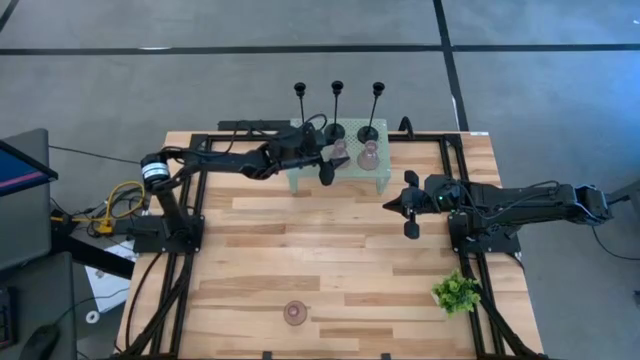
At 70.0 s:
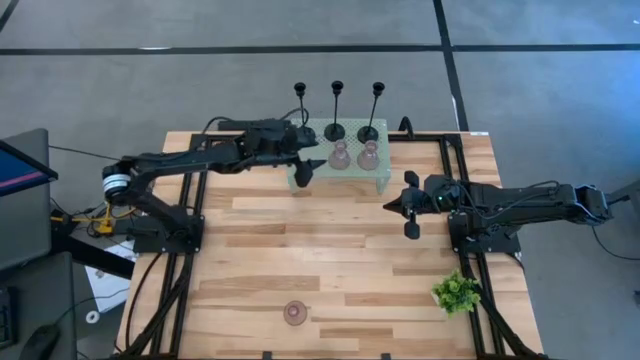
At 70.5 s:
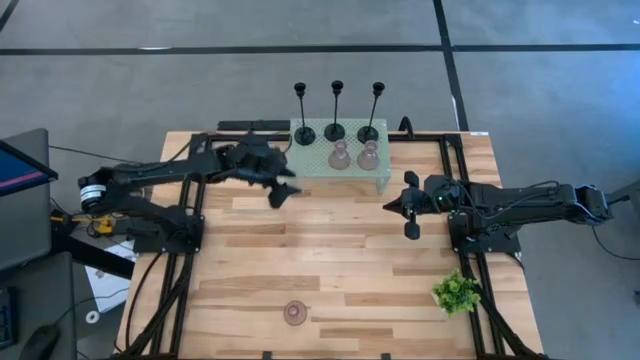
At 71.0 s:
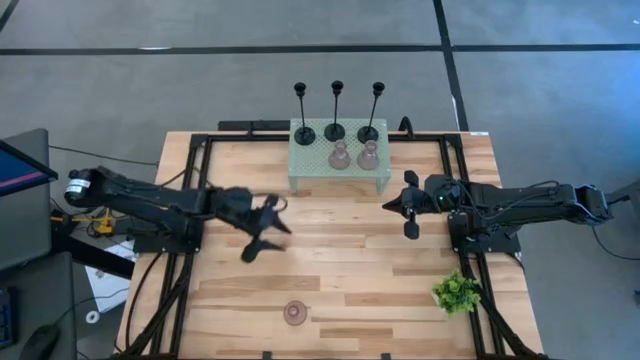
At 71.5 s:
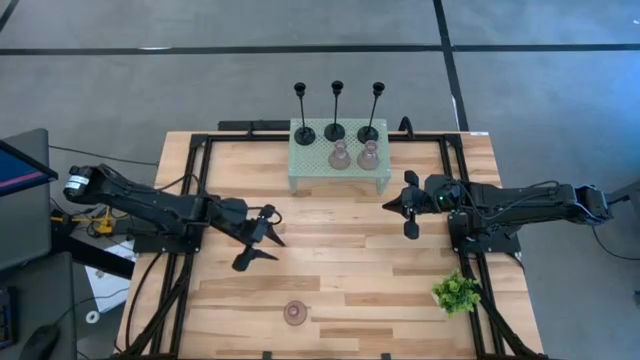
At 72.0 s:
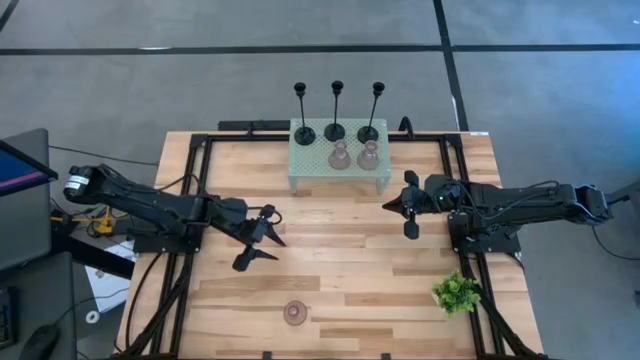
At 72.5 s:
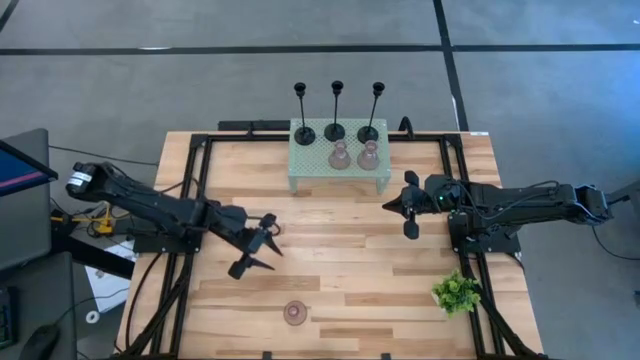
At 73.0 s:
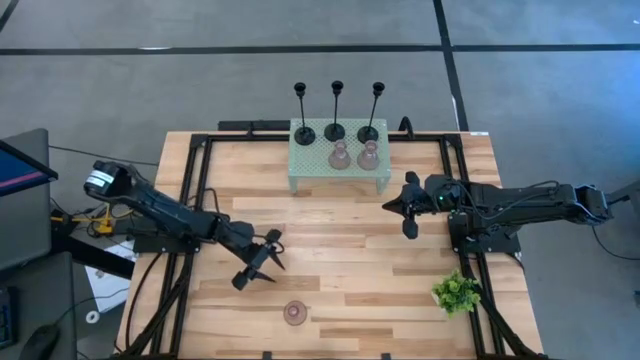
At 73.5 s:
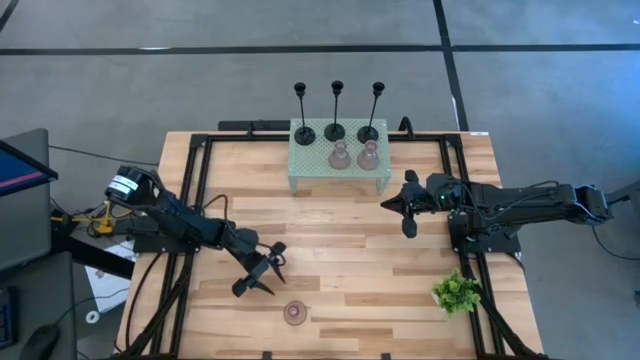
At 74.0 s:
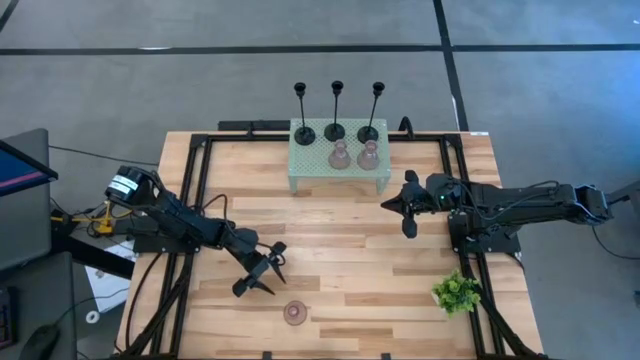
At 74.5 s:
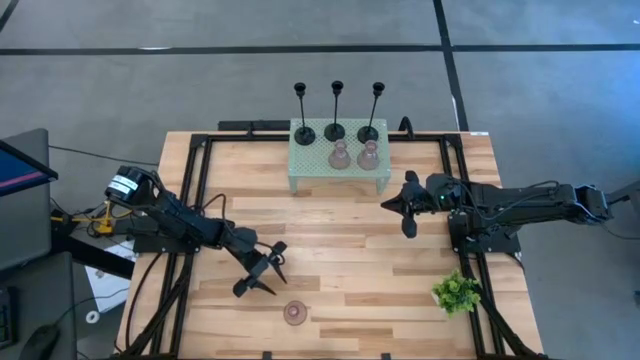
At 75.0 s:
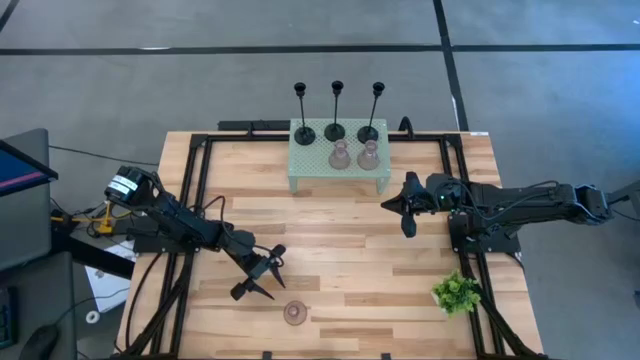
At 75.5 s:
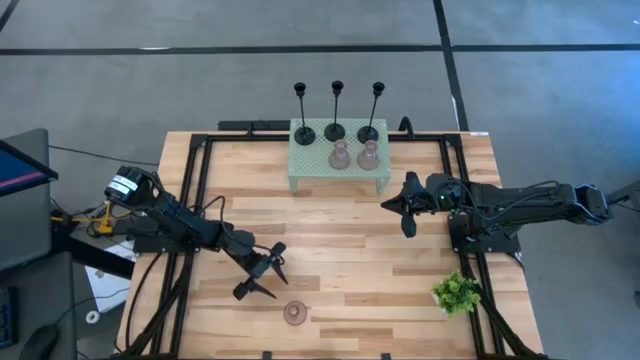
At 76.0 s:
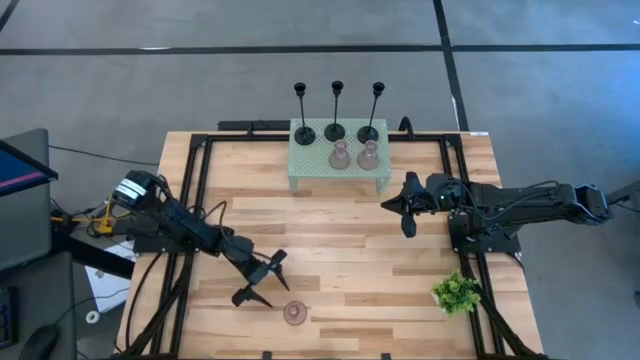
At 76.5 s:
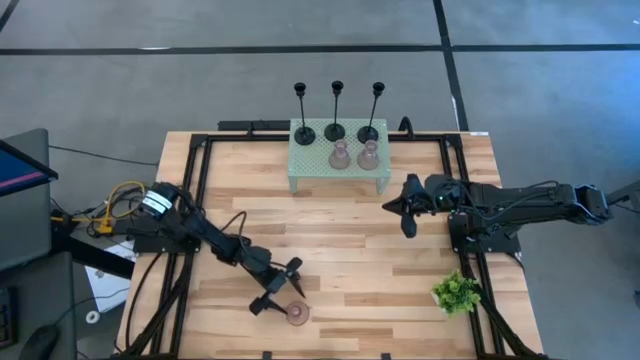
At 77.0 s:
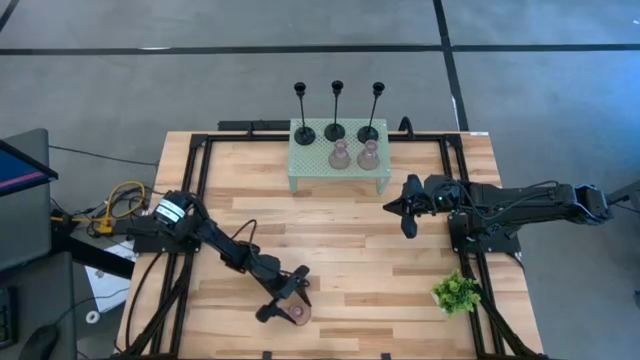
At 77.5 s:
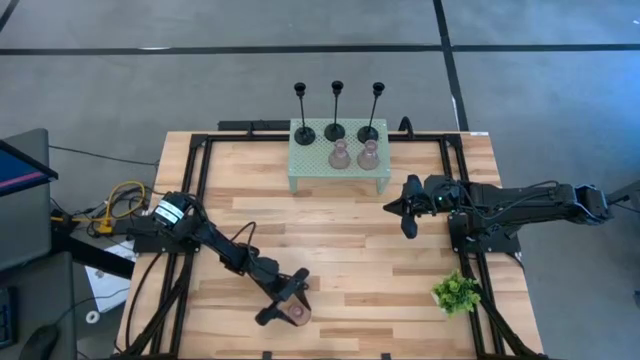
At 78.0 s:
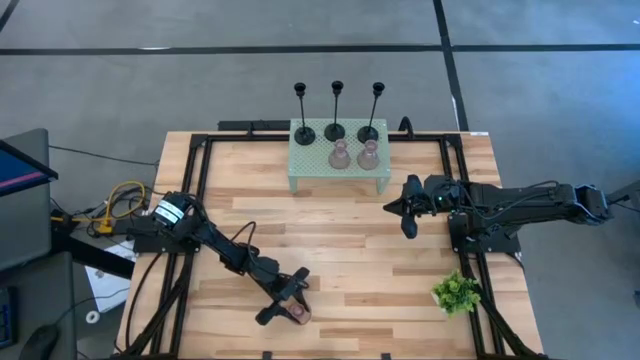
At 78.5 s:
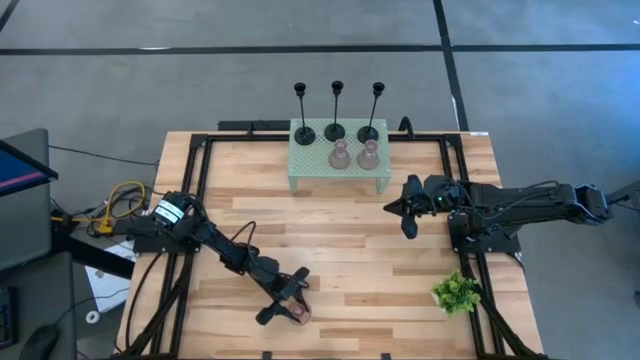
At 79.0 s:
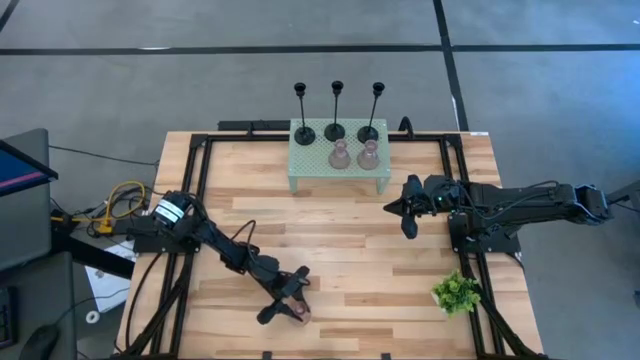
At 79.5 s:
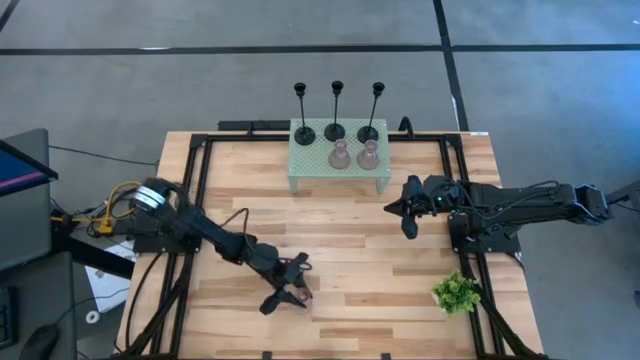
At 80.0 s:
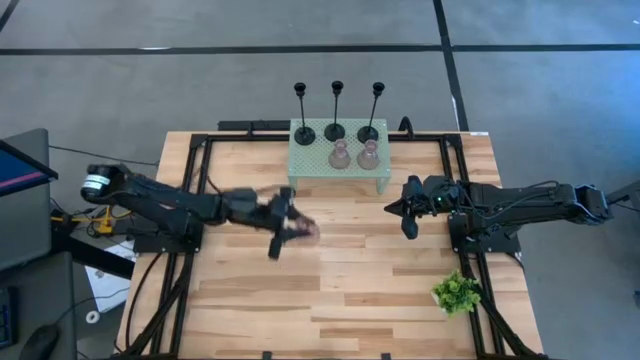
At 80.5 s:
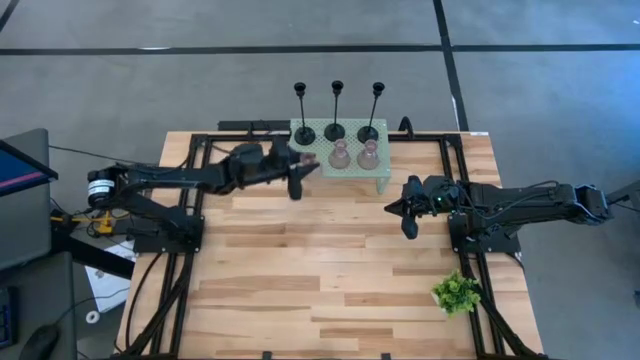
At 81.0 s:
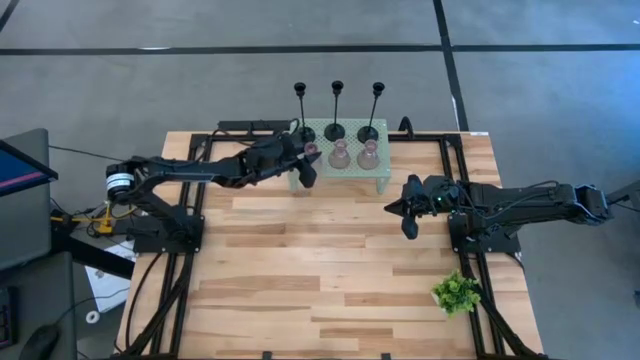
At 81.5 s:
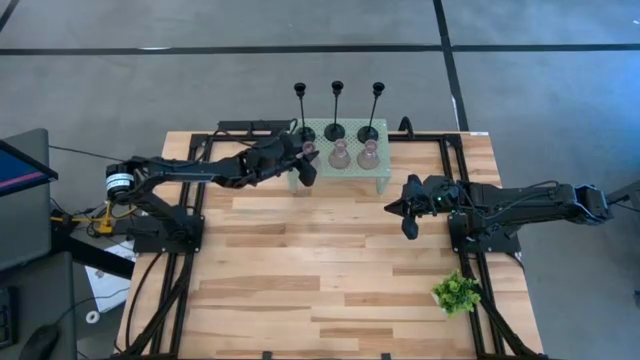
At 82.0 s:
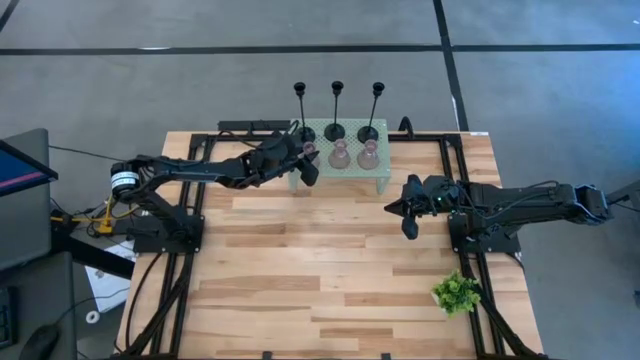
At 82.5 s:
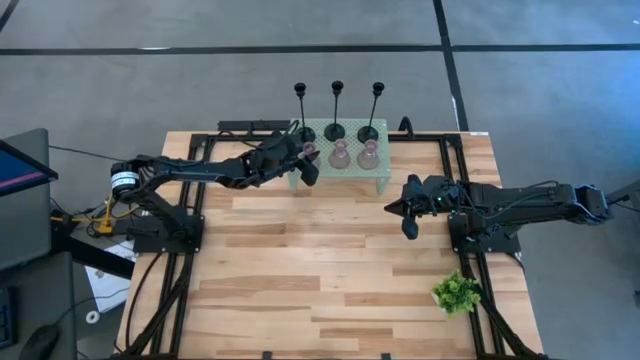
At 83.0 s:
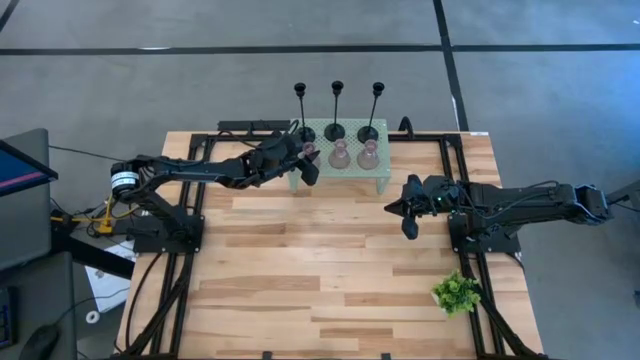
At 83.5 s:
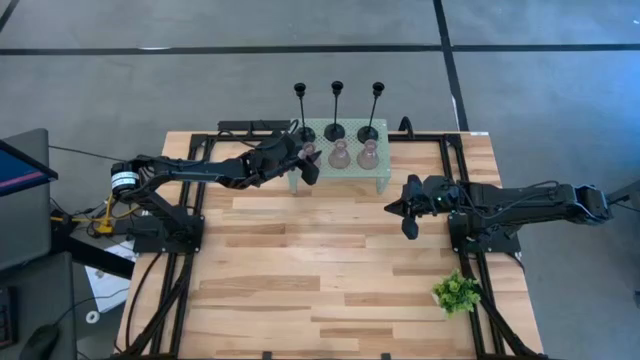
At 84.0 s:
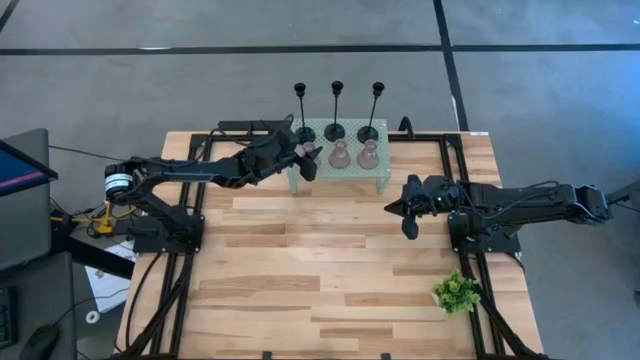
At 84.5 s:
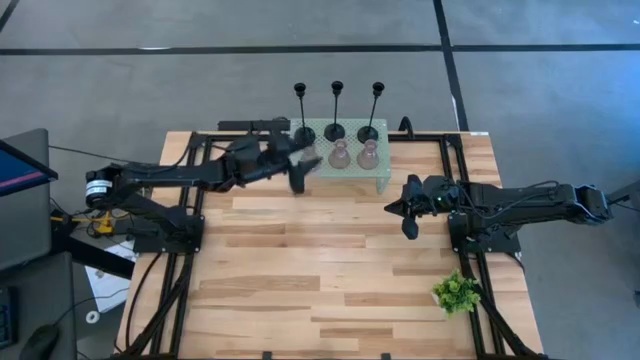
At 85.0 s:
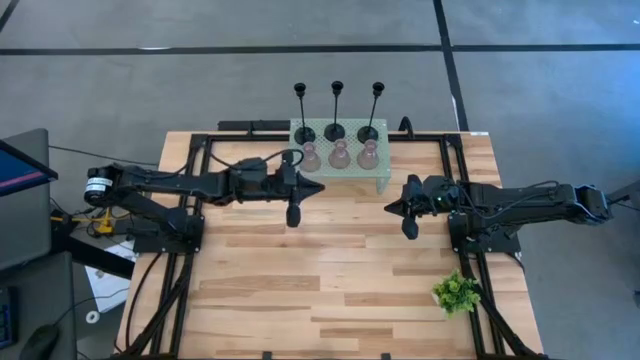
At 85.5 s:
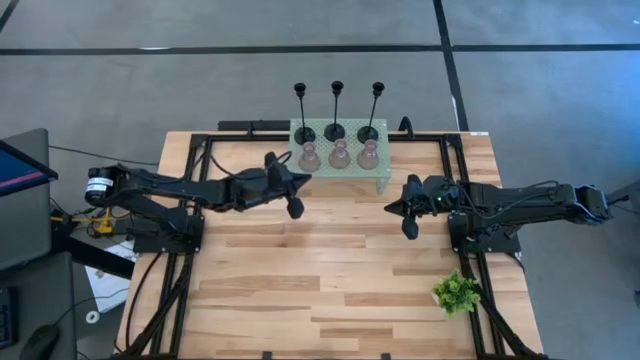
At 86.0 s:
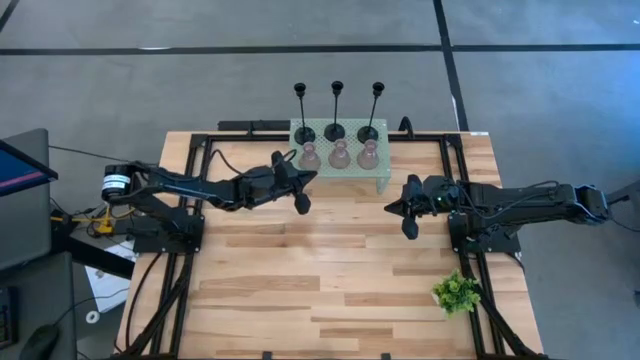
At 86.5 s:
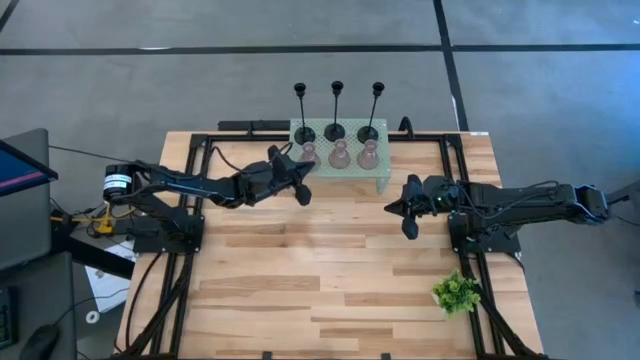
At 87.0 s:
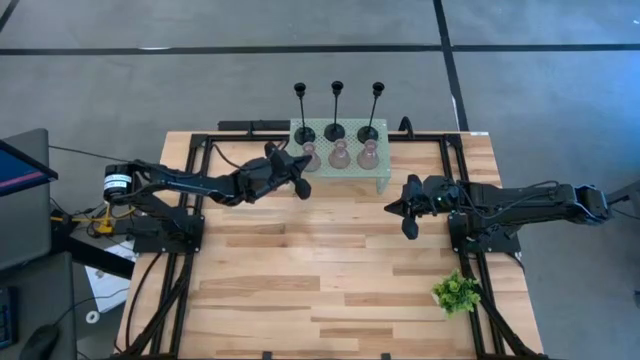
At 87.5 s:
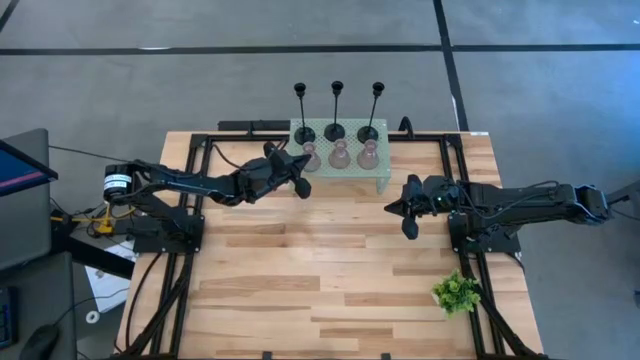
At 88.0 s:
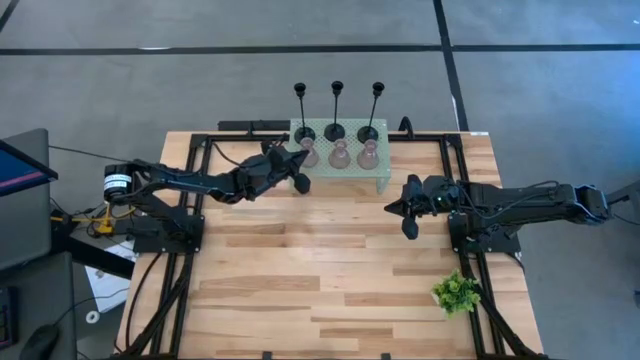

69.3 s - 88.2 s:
Task: Pick & Place candle stick holders
Put the purple vase candle holder on the shelf

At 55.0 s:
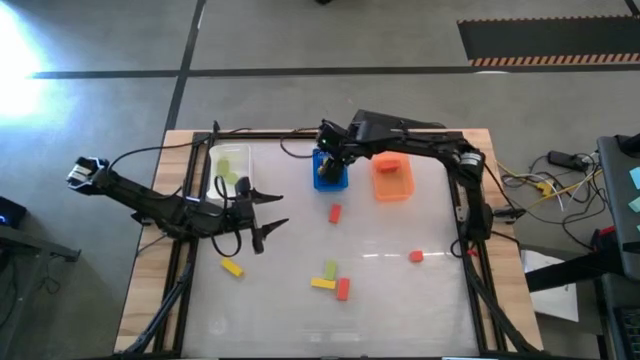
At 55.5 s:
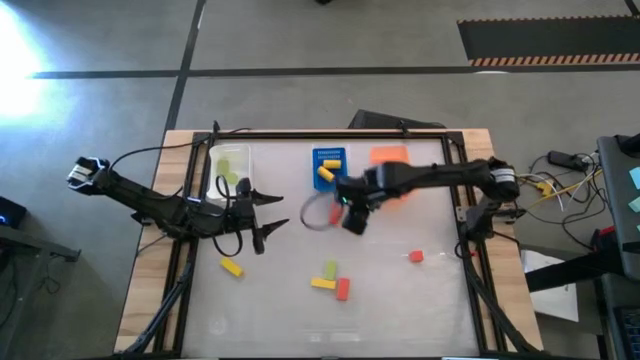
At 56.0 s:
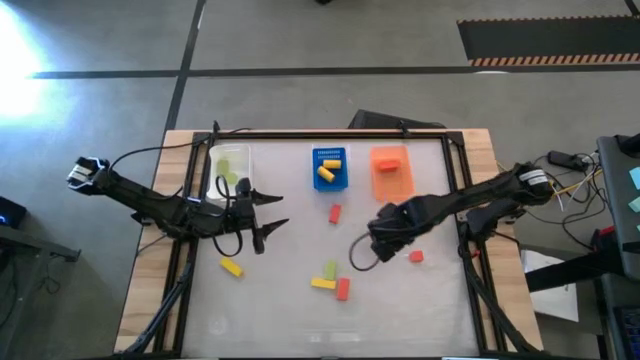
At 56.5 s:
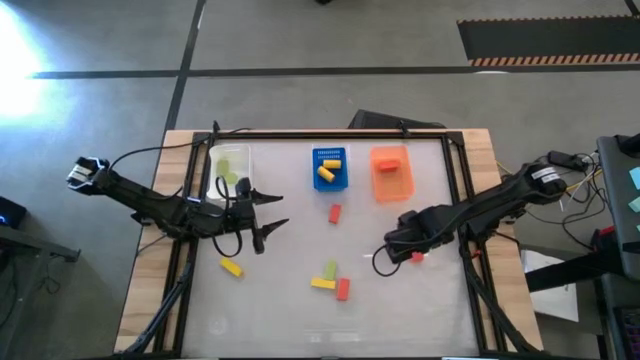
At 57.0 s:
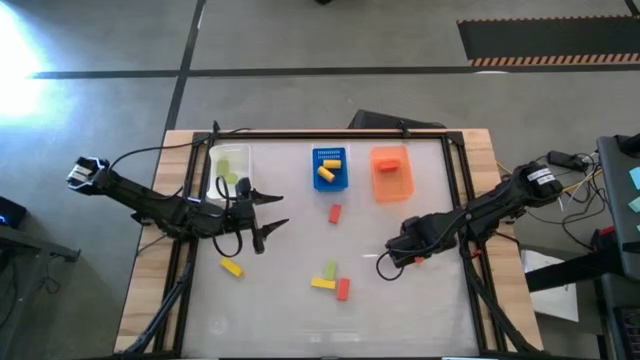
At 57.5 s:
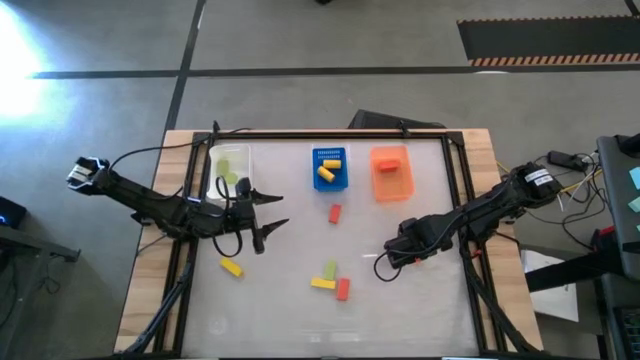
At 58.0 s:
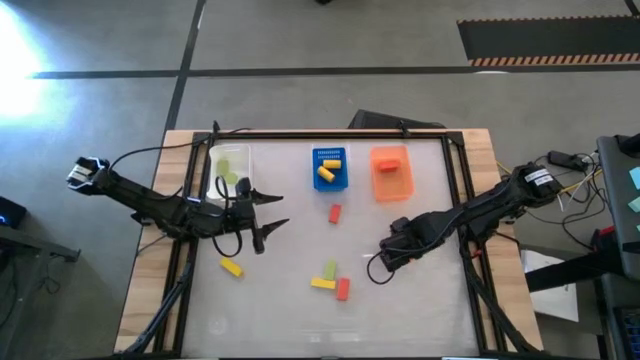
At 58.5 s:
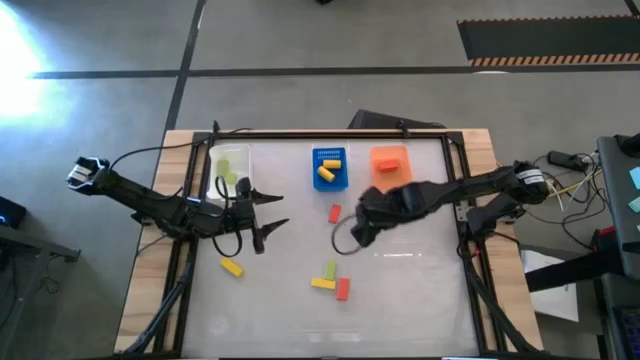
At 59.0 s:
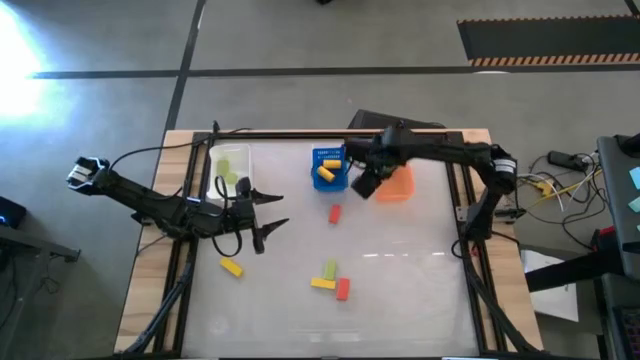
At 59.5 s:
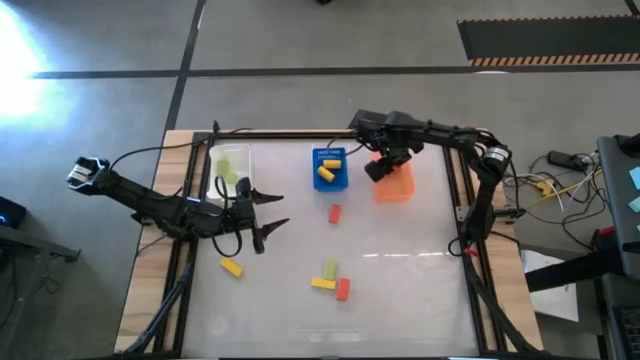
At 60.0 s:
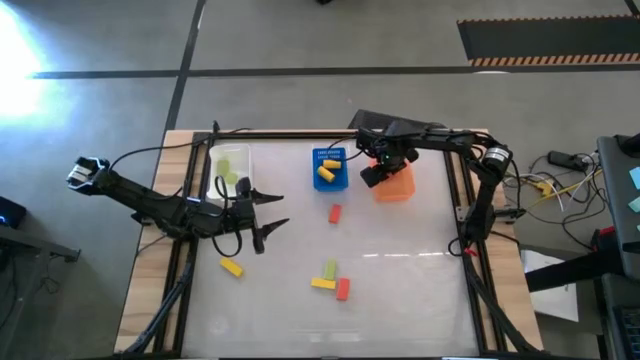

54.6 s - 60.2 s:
Task: Sort & place blocks by color
Put the orange block into the orange bin
